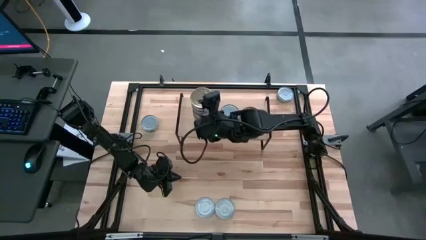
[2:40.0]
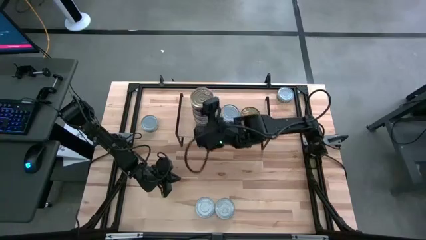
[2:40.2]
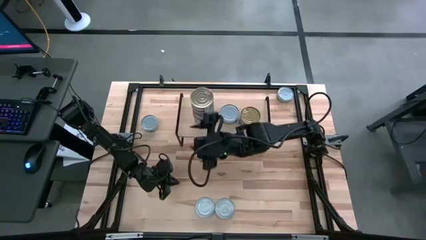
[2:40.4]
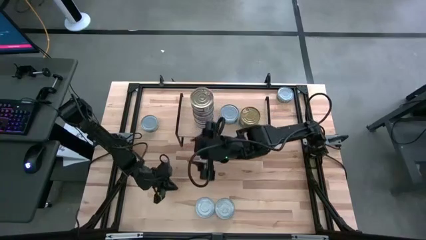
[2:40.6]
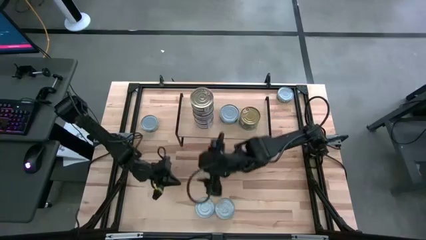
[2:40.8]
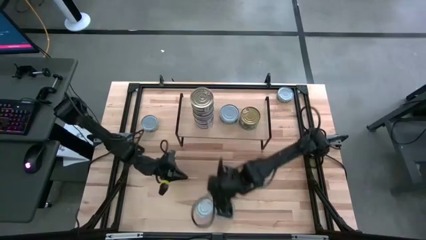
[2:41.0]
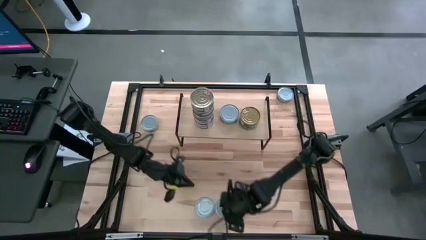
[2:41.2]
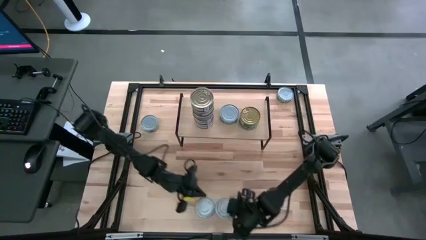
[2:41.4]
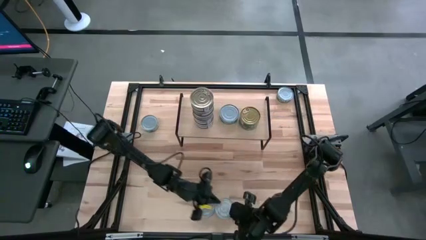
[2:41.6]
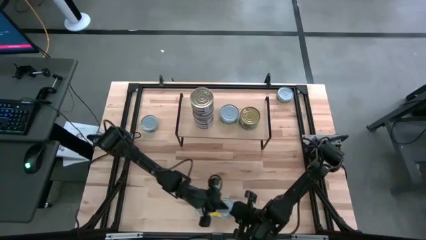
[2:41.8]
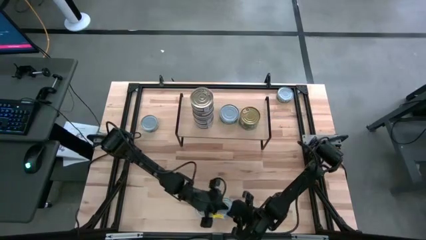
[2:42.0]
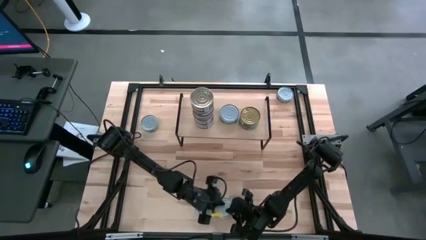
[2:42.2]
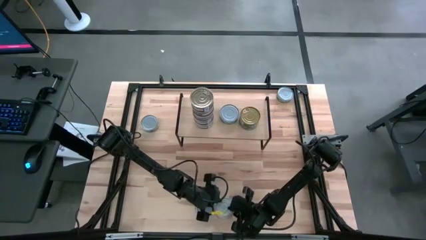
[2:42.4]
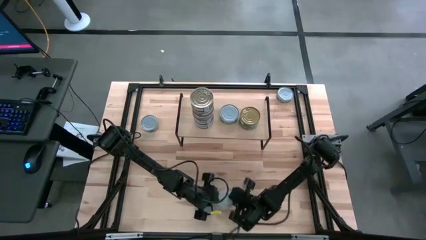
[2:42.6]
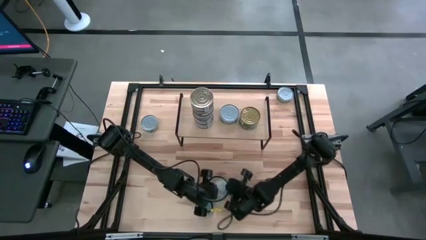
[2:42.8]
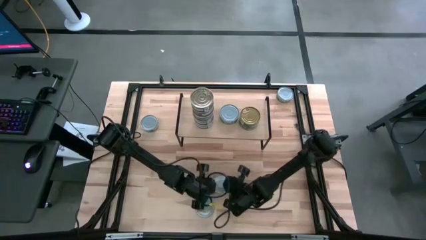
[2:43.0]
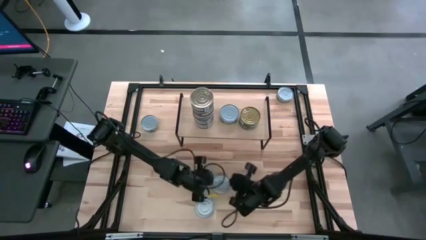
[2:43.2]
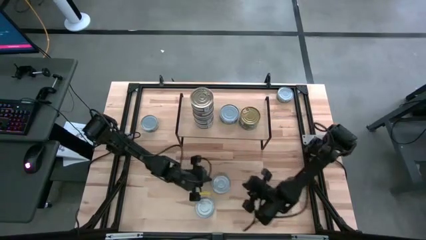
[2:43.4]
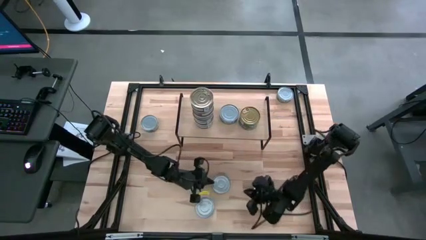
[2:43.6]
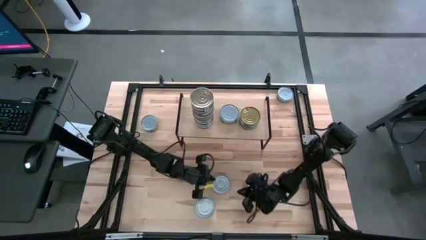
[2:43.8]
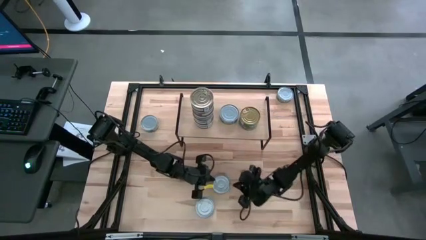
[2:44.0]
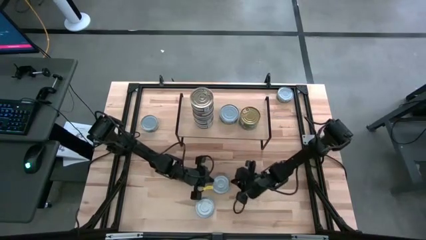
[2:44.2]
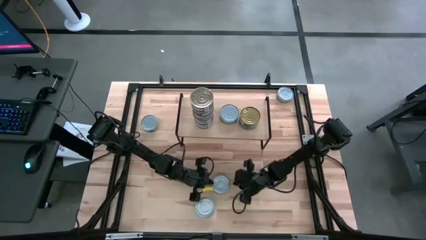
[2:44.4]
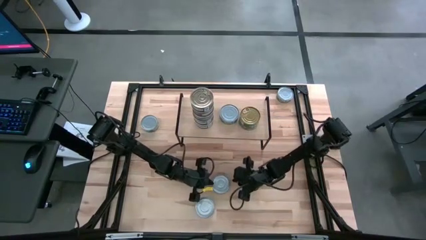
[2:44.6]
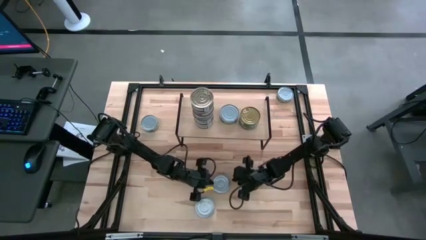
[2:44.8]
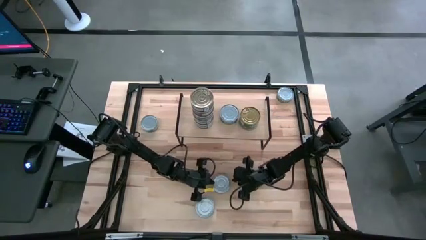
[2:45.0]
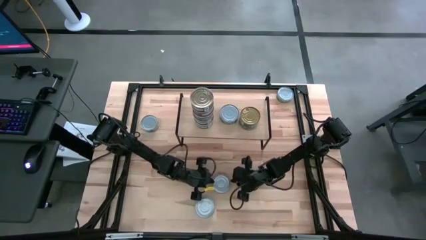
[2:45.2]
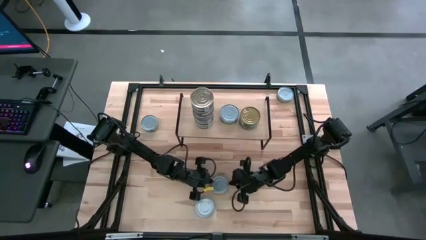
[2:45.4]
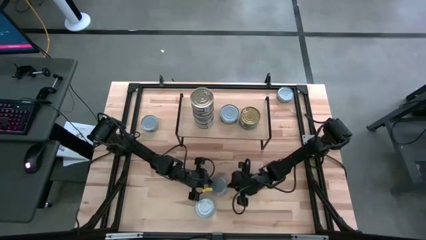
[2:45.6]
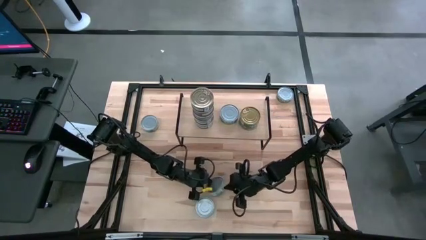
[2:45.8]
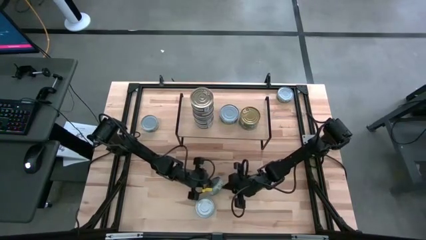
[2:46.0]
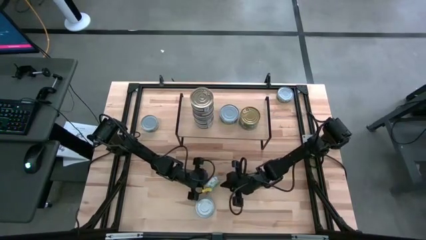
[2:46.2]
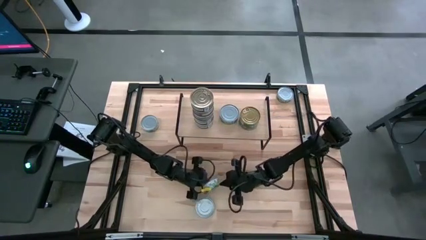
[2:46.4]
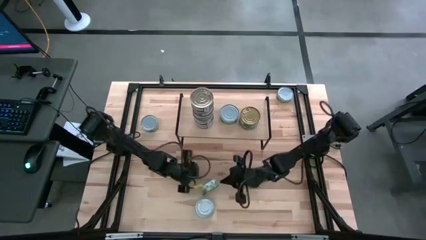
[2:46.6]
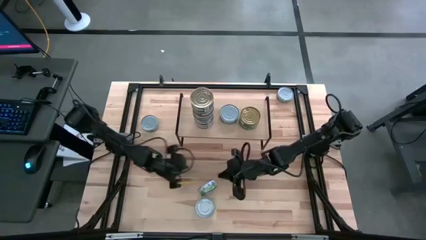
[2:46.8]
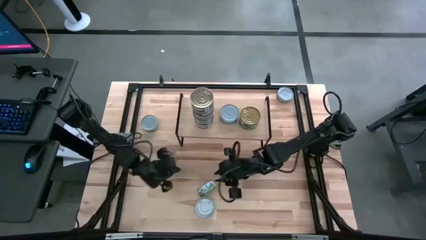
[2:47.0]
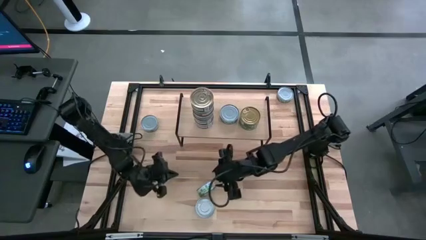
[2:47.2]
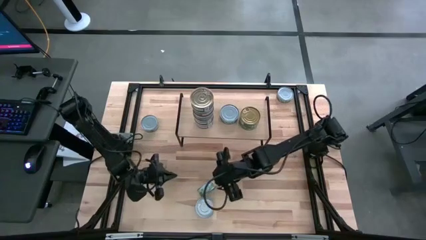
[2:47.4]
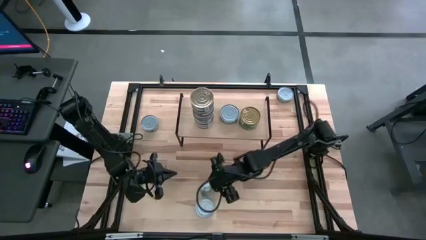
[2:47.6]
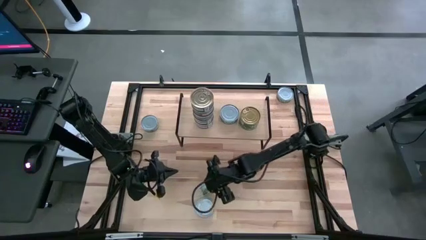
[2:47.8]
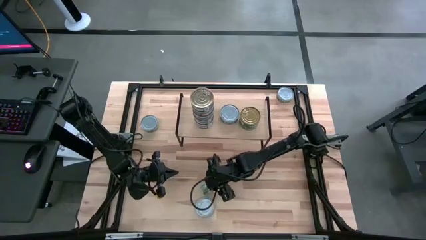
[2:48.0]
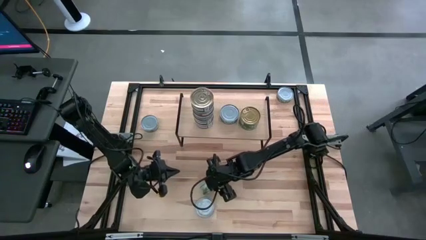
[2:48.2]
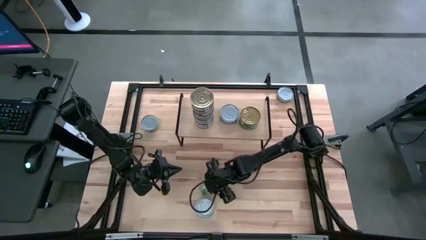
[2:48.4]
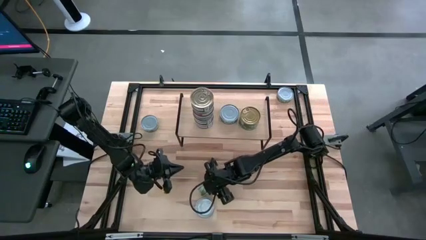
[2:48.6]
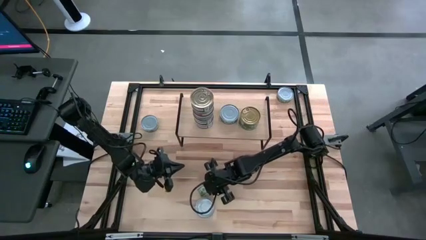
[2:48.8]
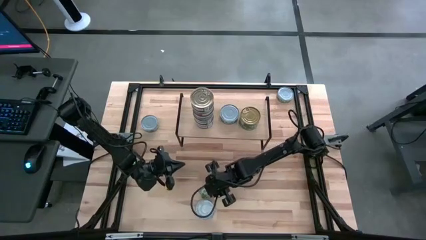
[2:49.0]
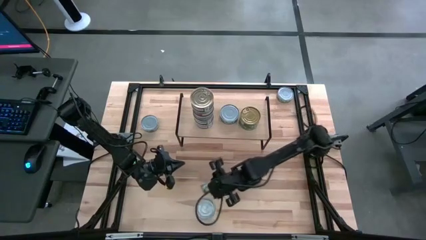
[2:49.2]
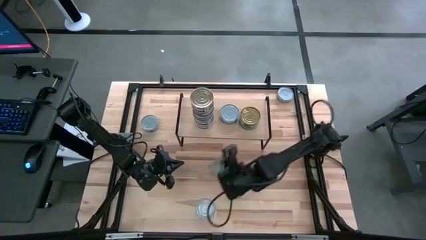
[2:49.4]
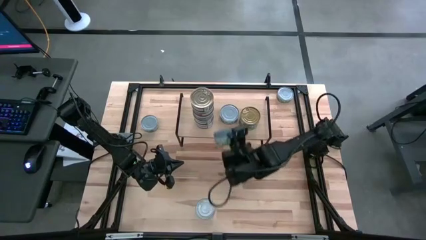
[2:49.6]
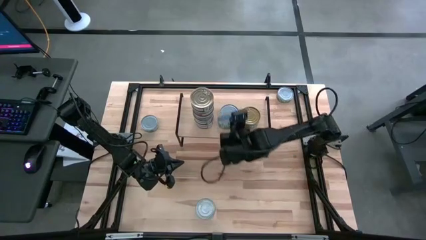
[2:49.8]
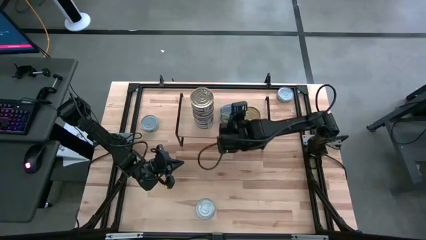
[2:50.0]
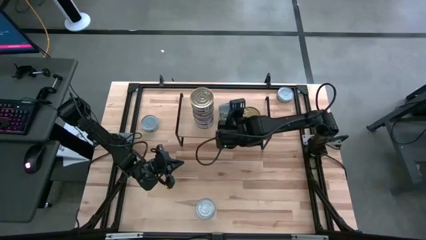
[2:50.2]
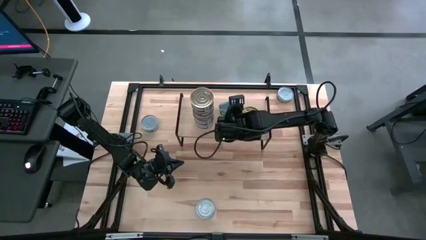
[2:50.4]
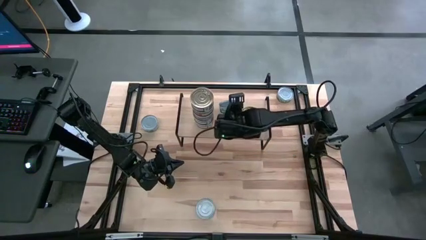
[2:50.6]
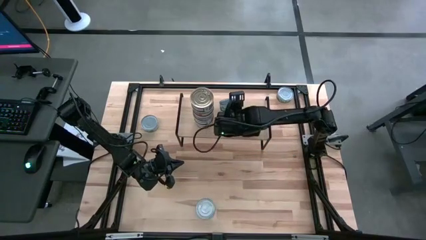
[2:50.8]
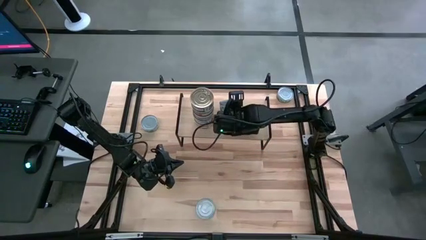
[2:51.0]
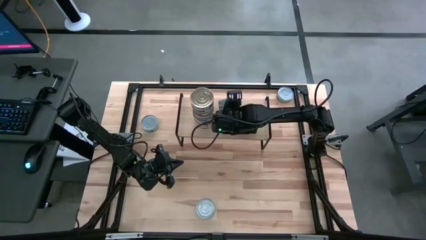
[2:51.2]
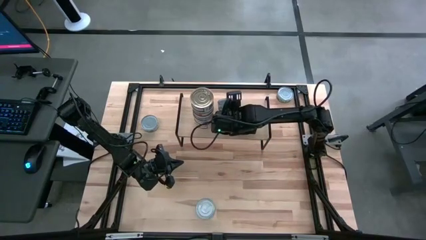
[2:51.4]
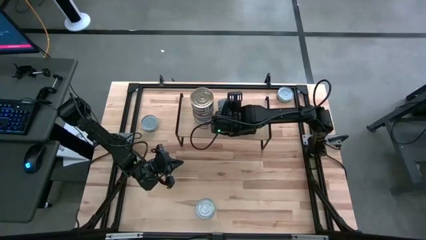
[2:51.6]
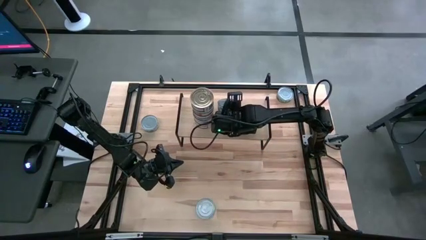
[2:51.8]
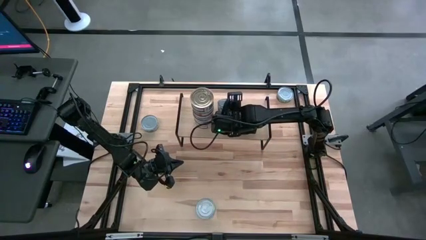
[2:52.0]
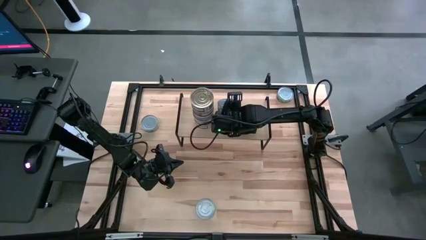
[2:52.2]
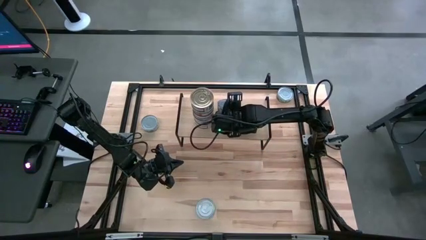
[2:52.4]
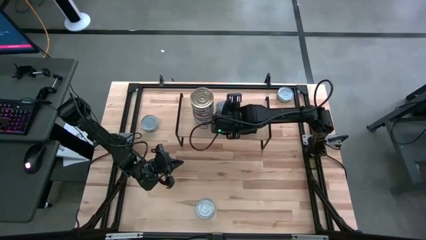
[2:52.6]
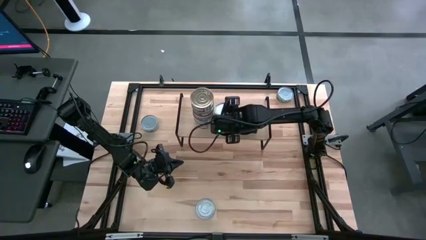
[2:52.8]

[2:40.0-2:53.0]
Task: Stack canned seafood by type on shelf
Stack the white-green tuna can on top of the white-green tuna can on the shelf
